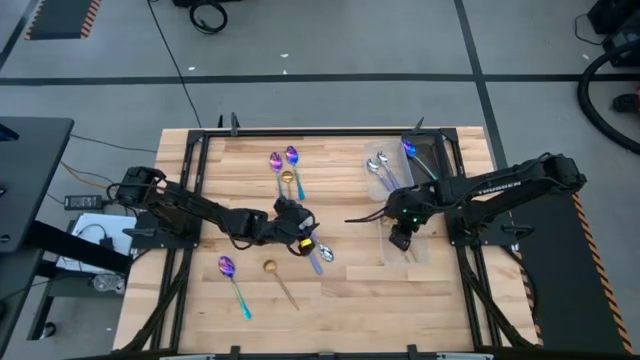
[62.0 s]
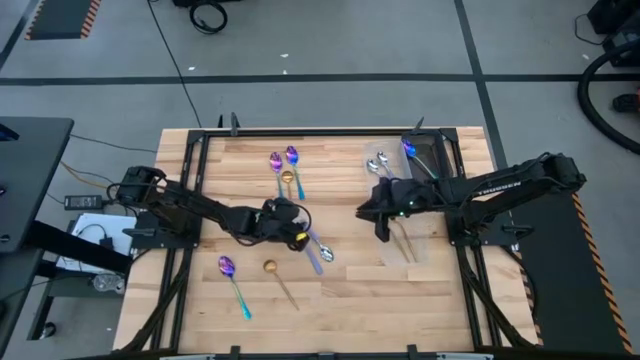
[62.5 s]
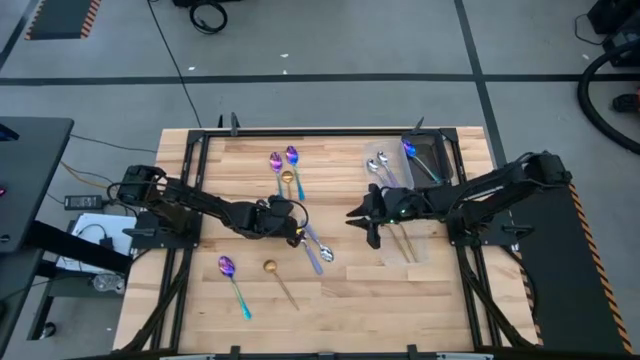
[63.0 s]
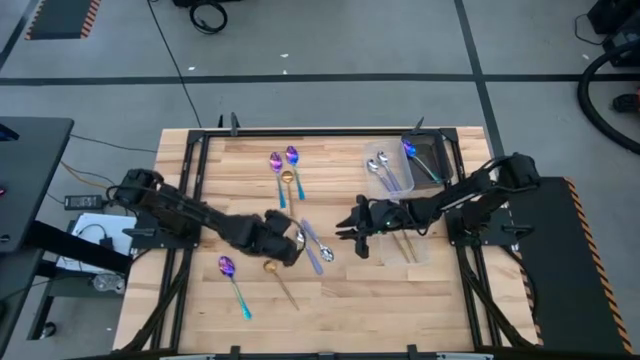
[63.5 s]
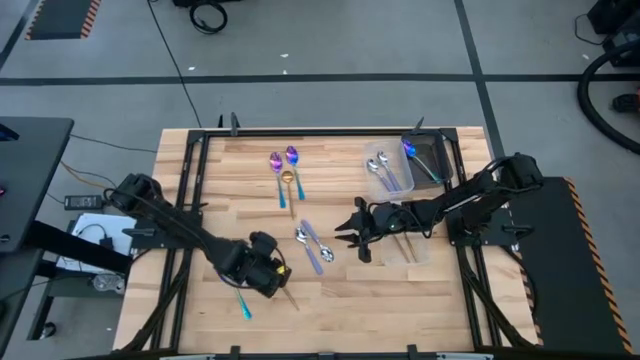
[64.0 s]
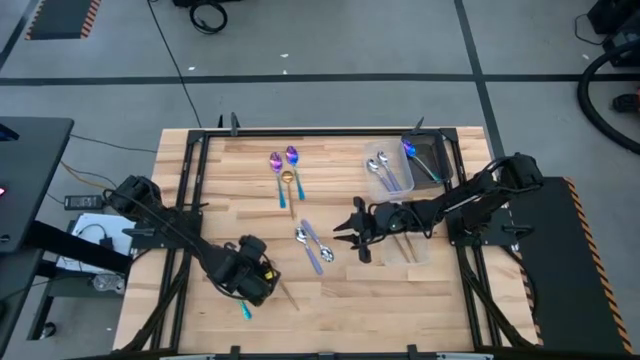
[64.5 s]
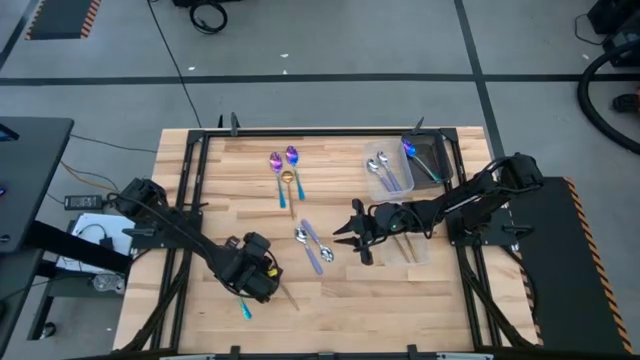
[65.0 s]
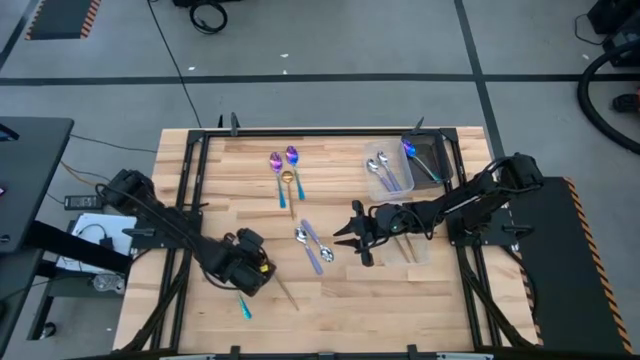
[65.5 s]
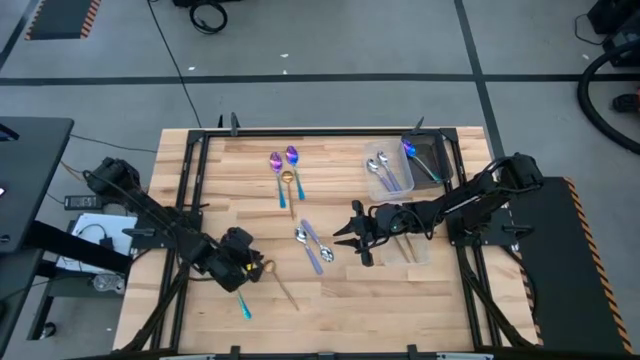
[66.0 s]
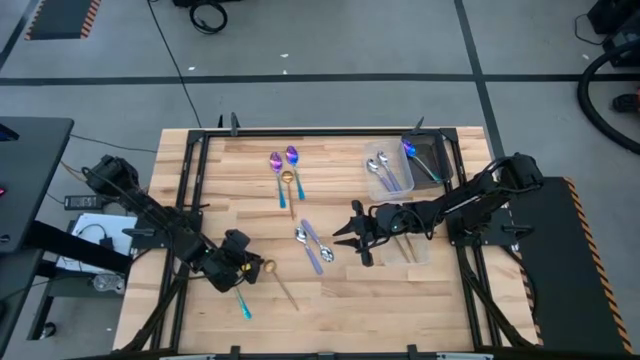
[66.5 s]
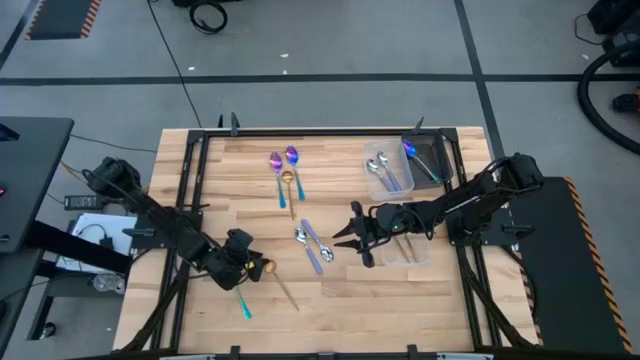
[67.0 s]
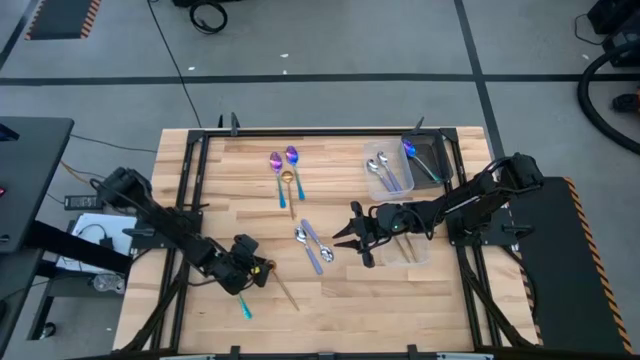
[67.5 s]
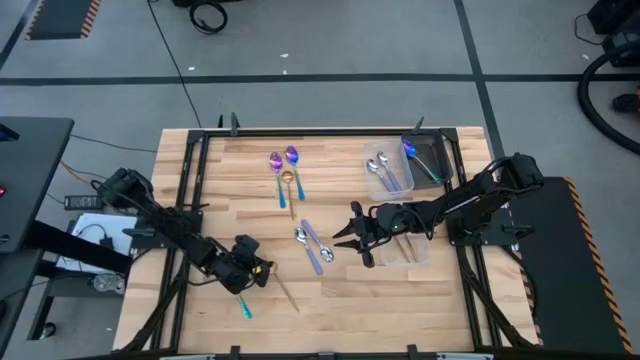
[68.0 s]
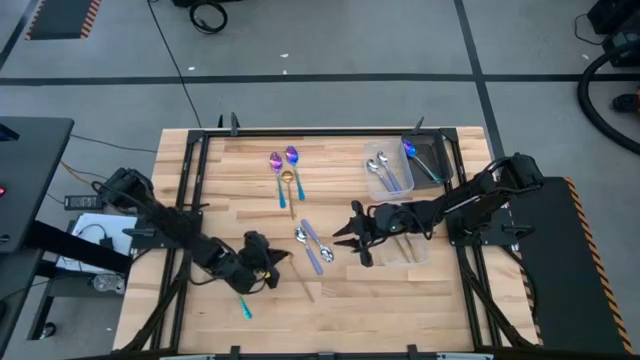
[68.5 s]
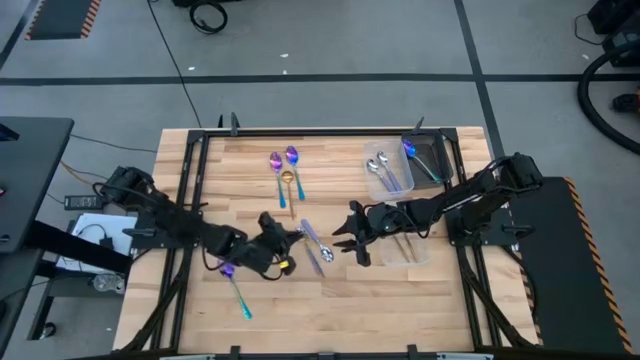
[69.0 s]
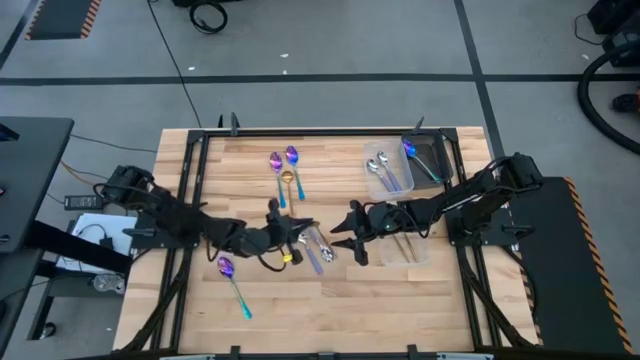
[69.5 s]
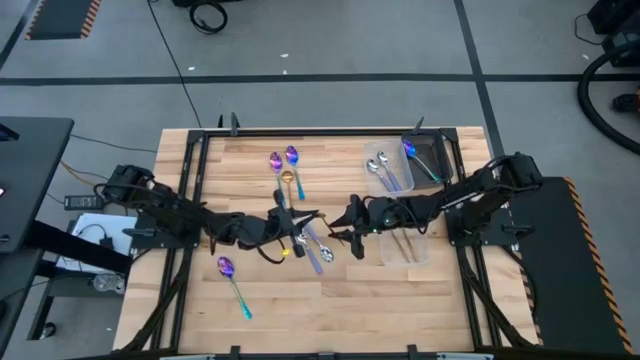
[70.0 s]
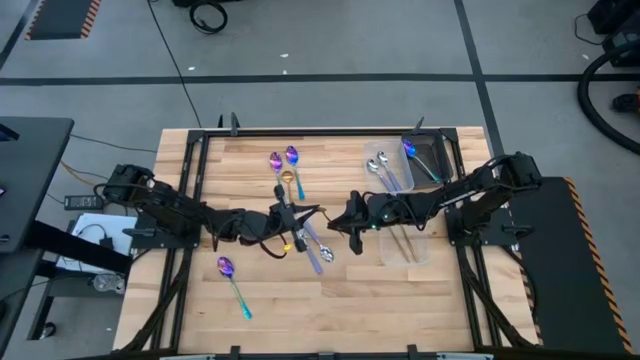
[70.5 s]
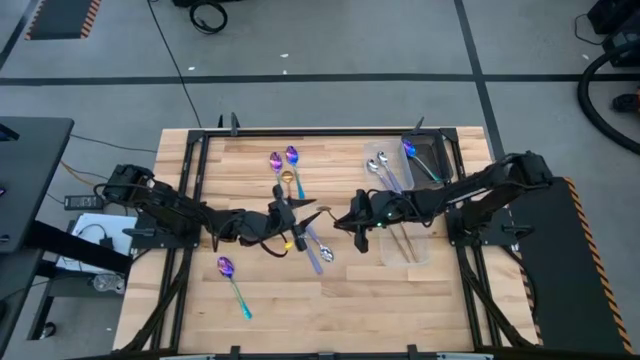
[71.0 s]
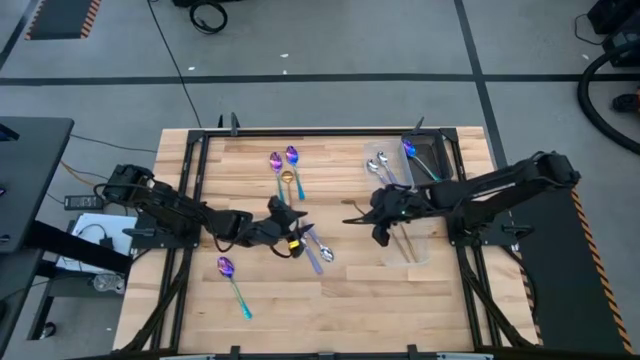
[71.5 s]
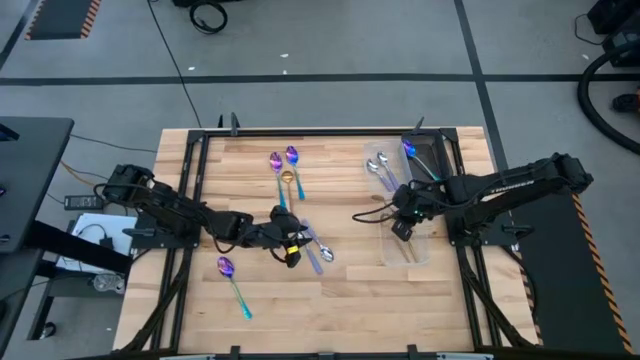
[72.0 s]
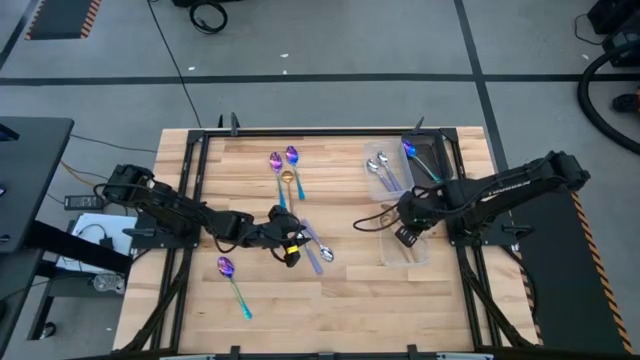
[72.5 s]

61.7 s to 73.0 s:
Task: Sort silverware by color (type)
Put the gold spoon into the bottom transparent bin

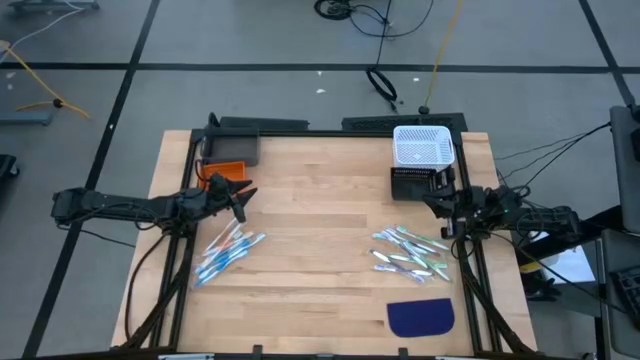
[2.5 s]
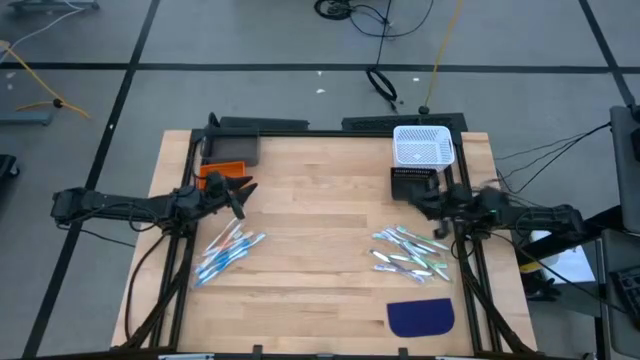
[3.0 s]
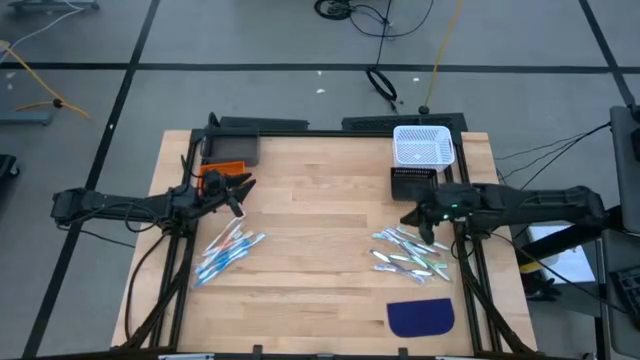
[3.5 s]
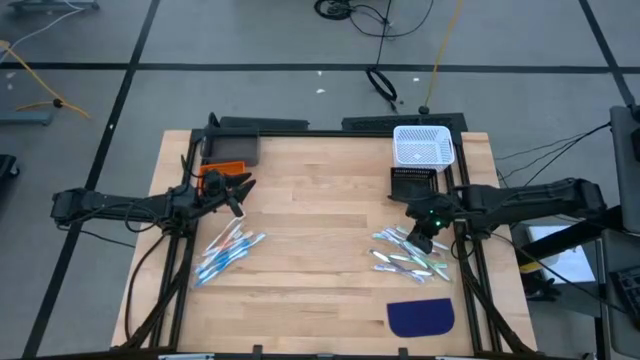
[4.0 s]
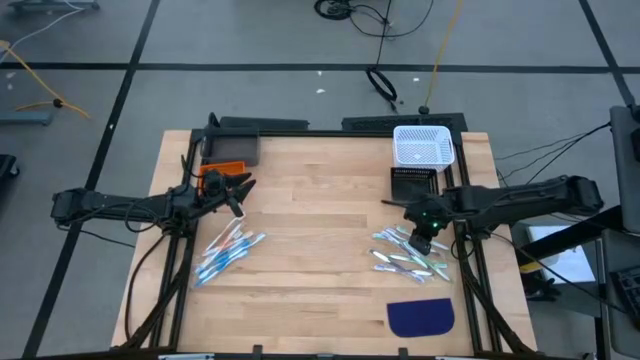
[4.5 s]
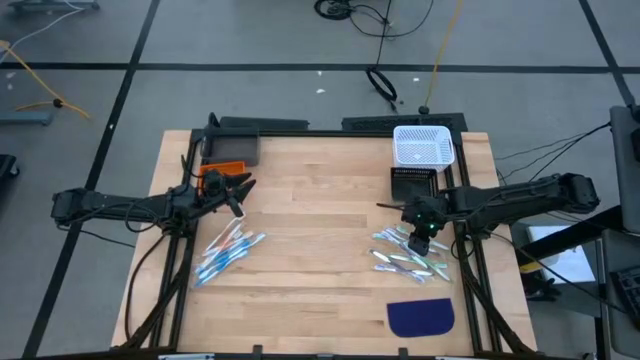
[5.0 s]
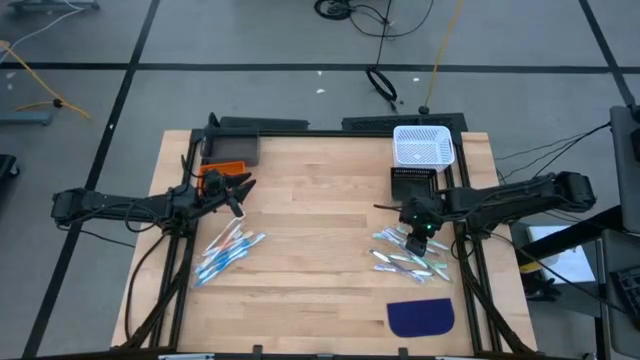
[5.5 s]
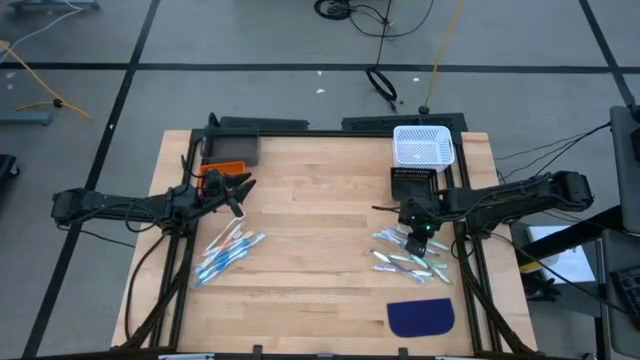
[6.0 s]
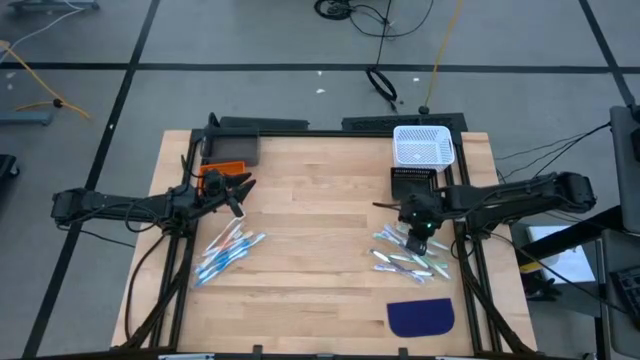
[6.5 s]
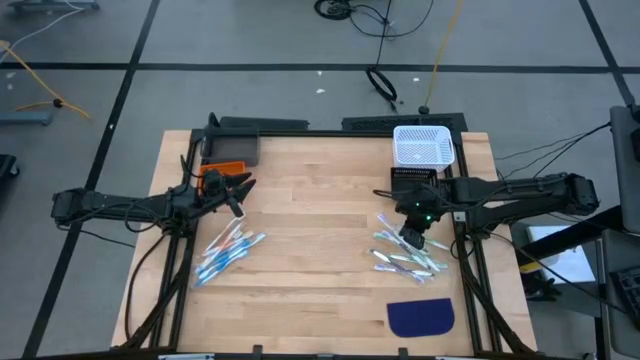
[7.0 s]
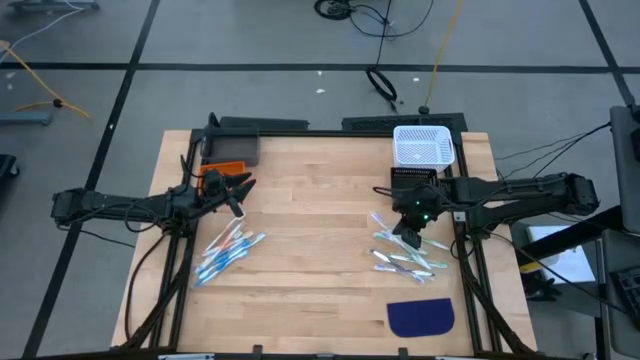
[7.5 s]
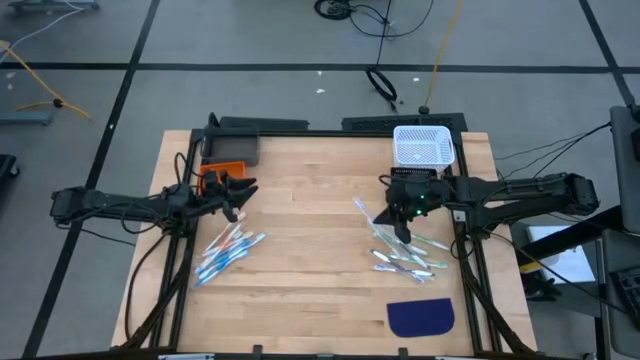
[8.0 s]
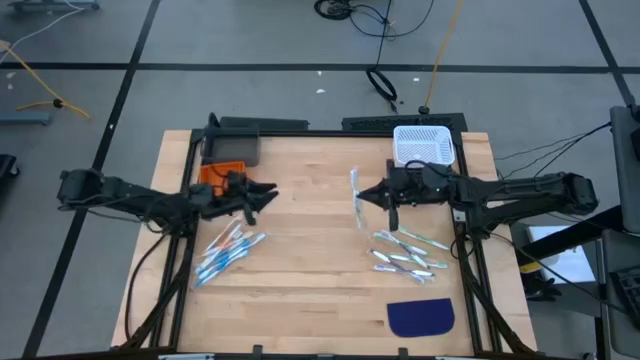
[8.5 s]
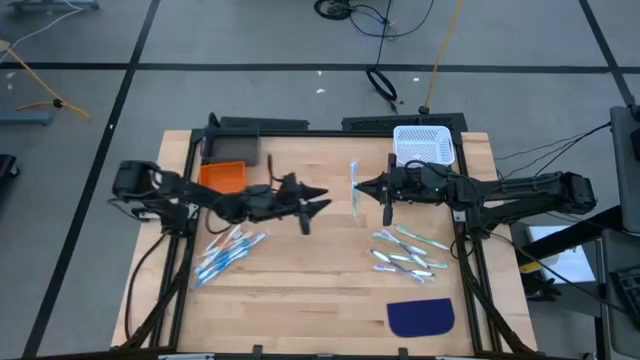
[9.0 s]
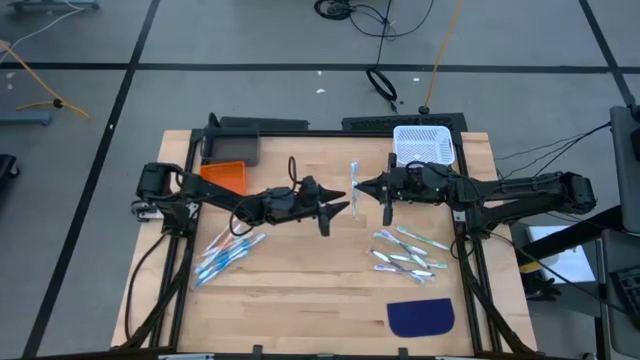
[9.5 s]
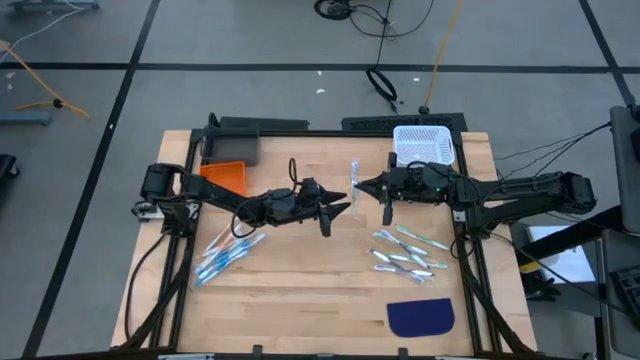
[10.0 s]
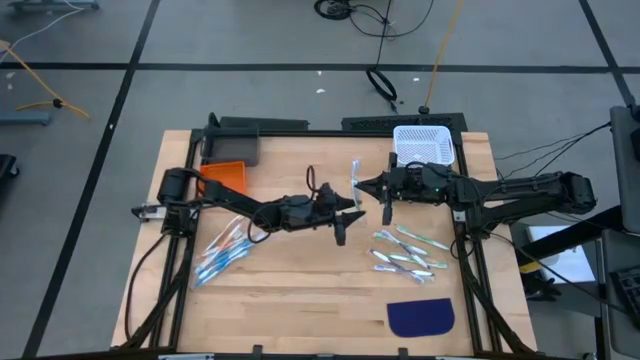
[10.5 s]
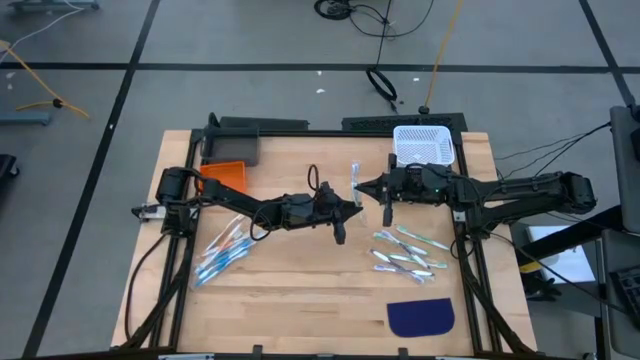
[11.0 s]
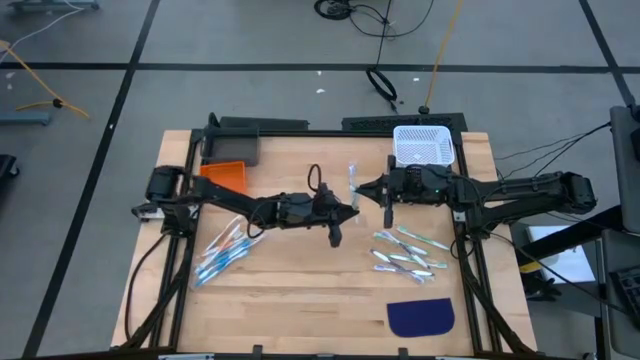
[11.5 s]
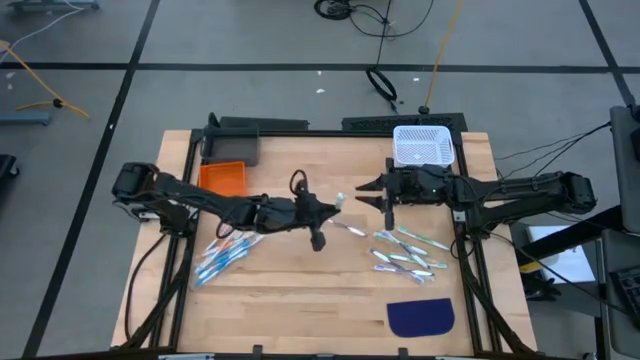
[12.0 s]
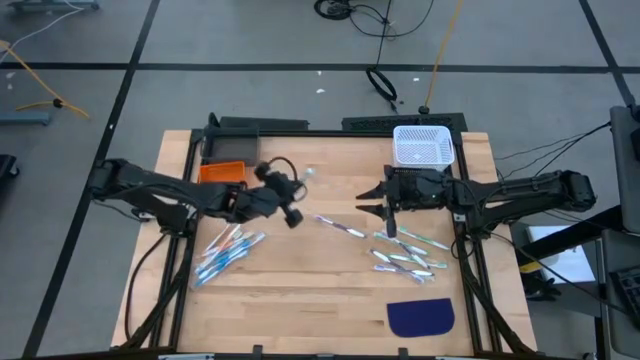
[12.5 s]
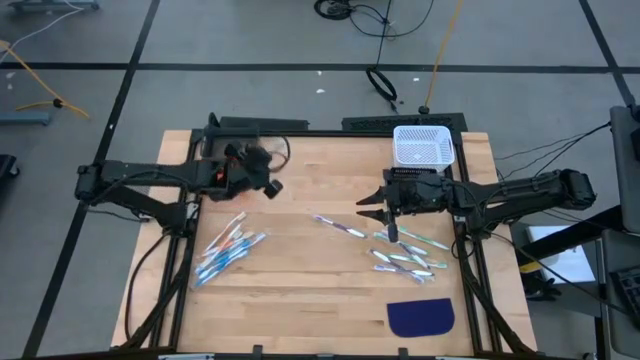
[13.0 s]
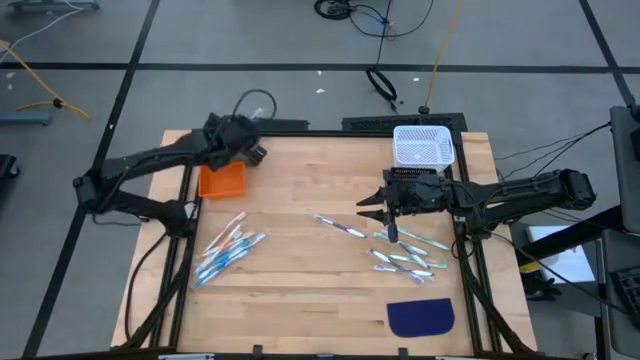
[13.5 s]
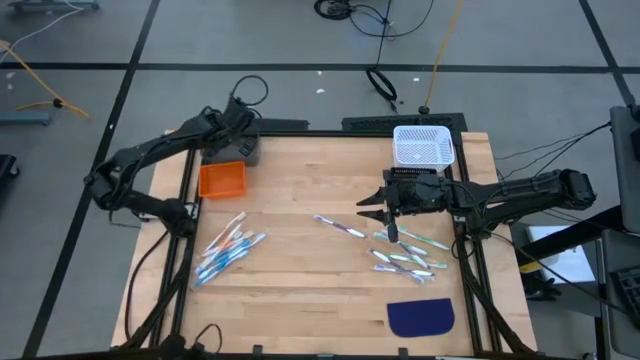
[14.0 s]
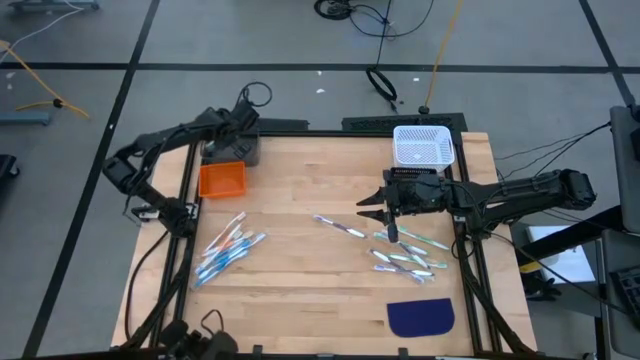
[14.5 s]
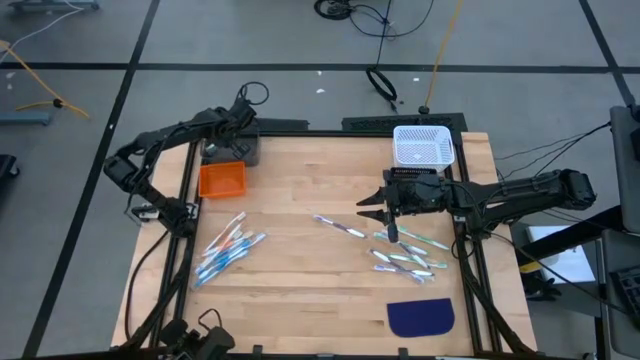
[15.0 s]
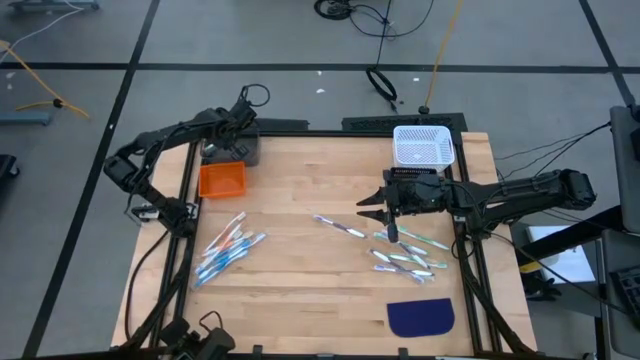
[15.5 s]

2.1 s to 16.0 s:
Task: Pick & Place Toothbrushes
Put the green toothbrush into the gray bin
